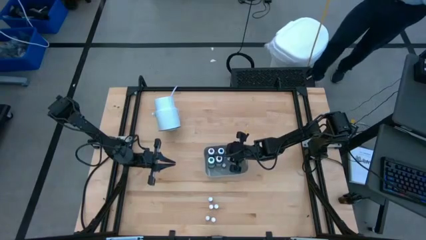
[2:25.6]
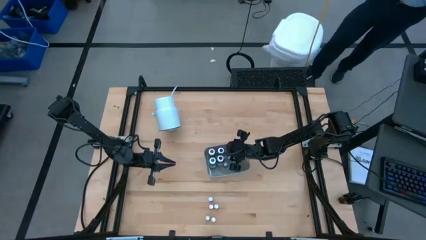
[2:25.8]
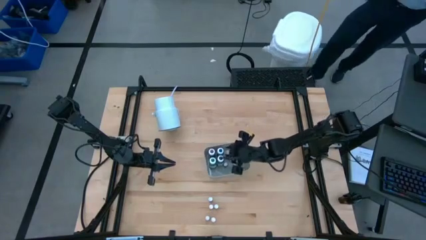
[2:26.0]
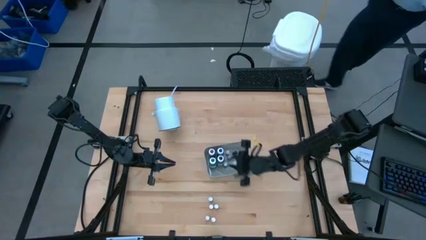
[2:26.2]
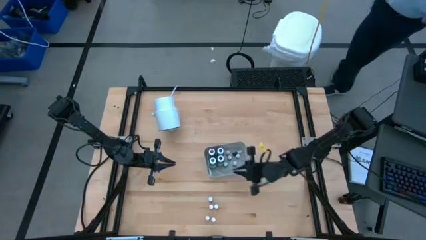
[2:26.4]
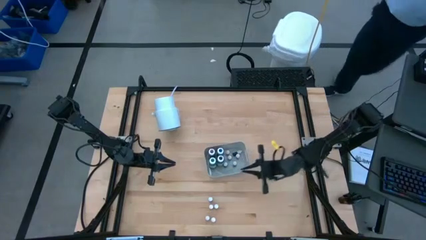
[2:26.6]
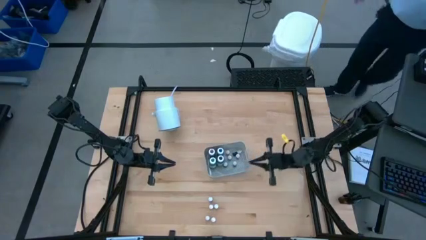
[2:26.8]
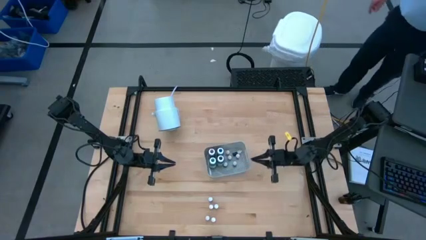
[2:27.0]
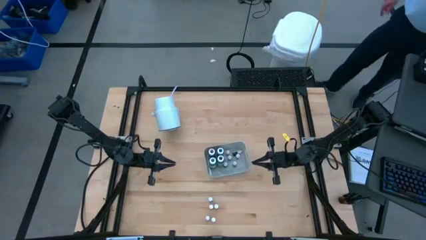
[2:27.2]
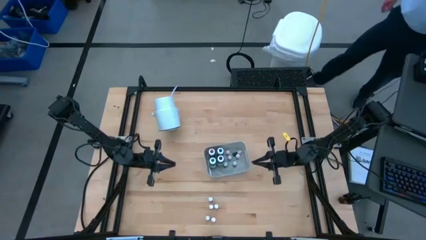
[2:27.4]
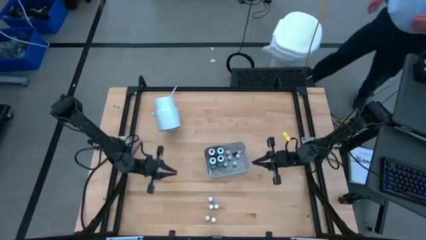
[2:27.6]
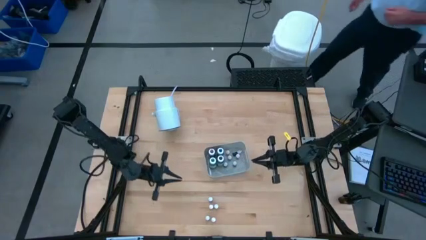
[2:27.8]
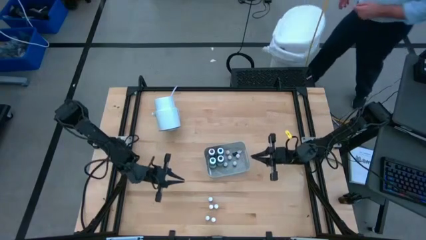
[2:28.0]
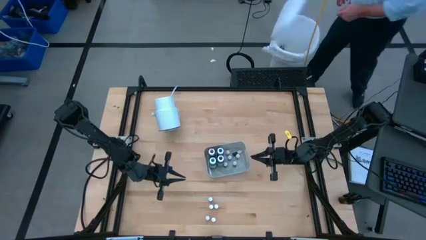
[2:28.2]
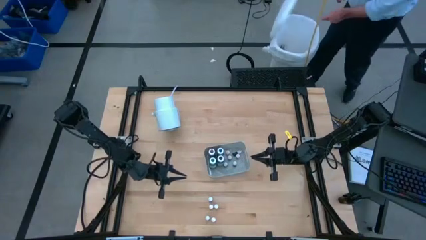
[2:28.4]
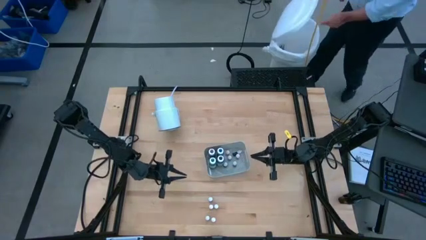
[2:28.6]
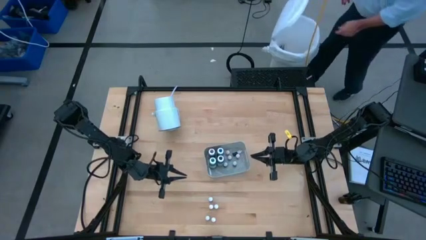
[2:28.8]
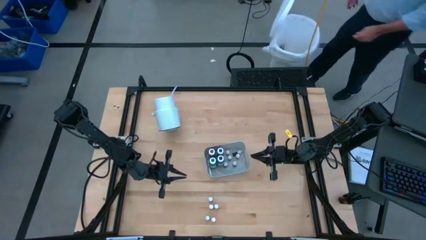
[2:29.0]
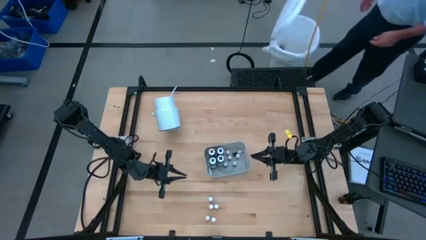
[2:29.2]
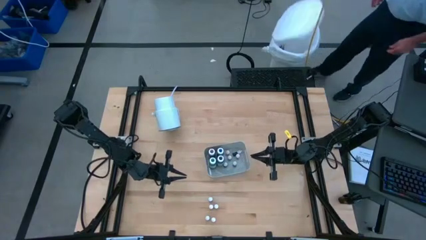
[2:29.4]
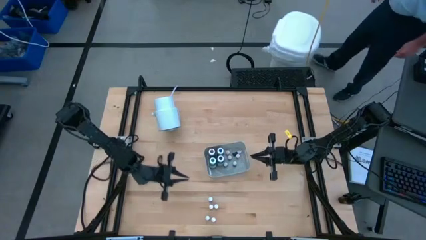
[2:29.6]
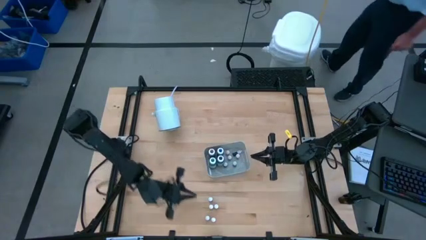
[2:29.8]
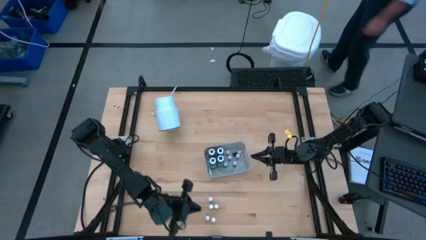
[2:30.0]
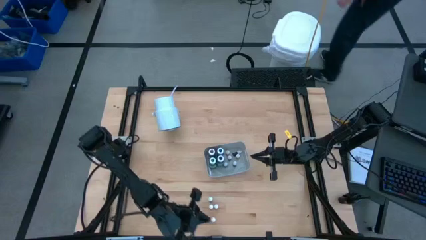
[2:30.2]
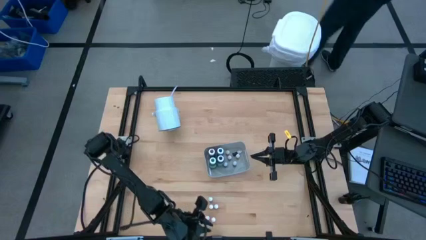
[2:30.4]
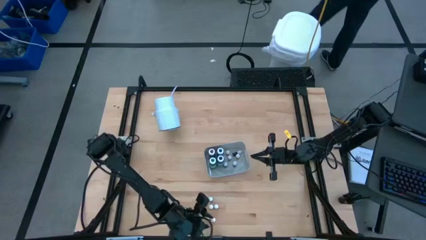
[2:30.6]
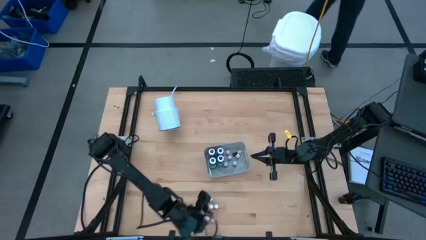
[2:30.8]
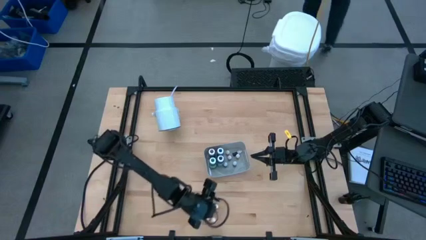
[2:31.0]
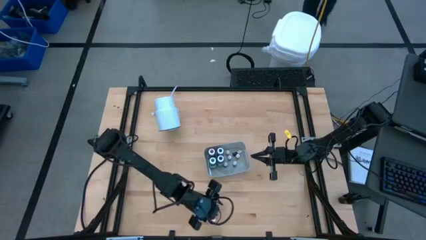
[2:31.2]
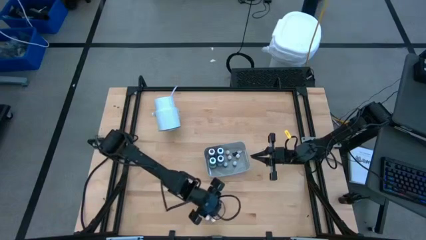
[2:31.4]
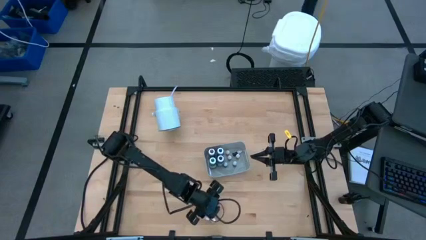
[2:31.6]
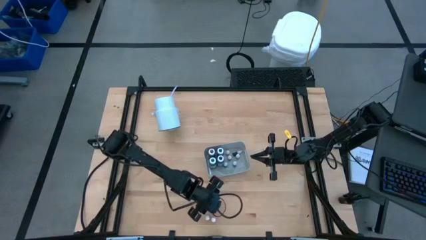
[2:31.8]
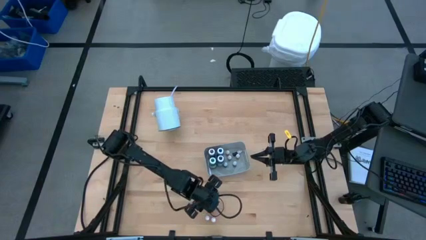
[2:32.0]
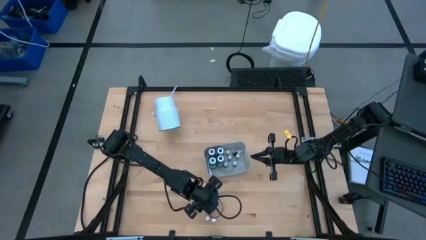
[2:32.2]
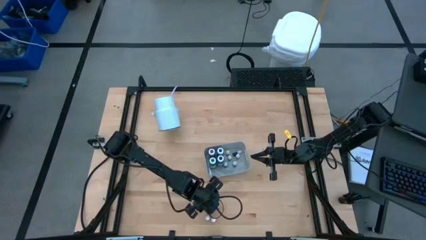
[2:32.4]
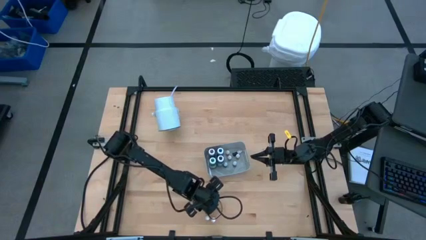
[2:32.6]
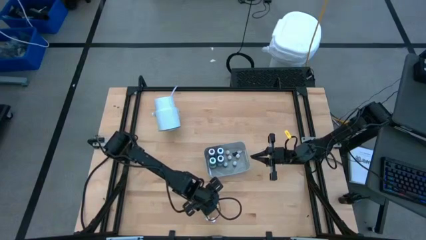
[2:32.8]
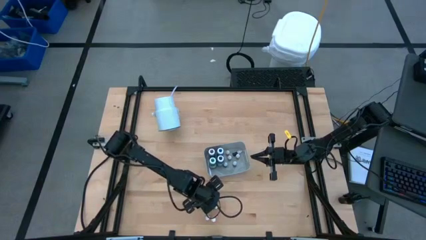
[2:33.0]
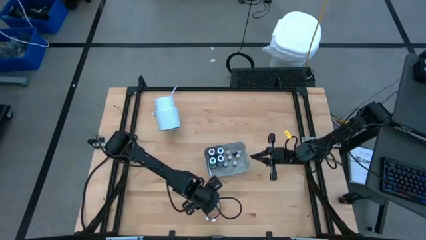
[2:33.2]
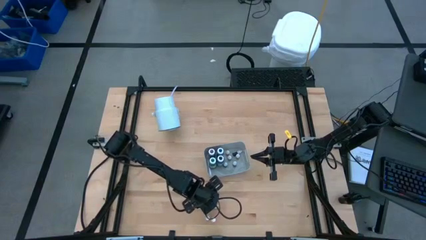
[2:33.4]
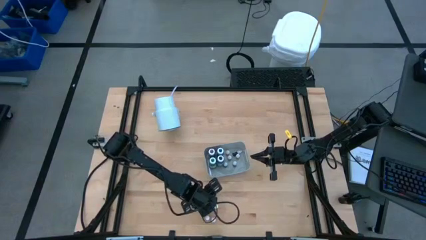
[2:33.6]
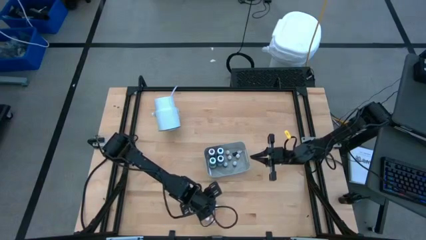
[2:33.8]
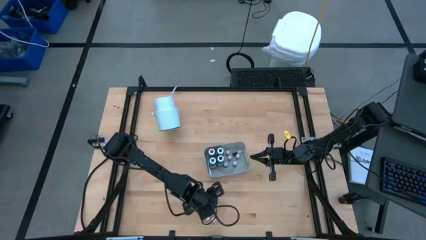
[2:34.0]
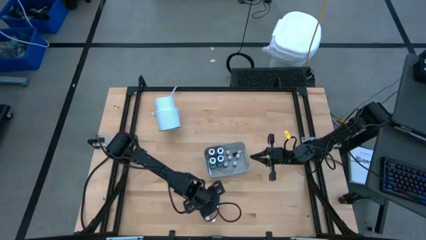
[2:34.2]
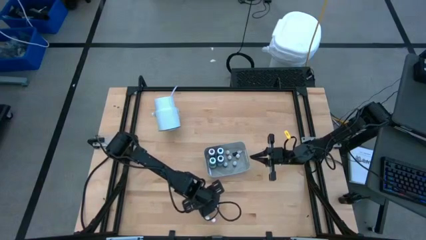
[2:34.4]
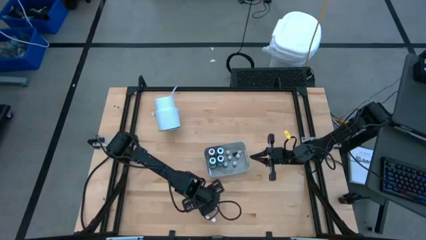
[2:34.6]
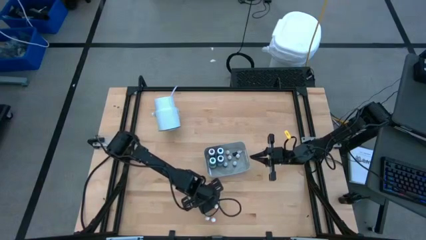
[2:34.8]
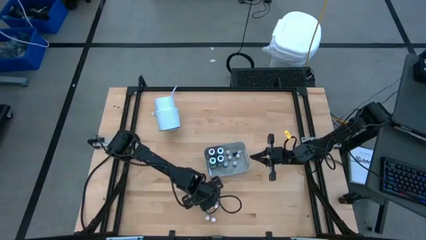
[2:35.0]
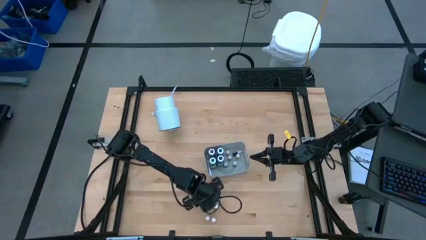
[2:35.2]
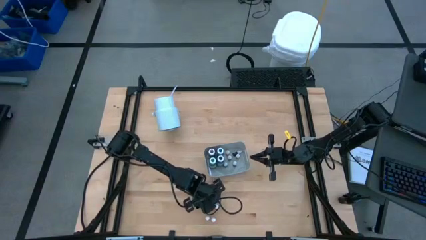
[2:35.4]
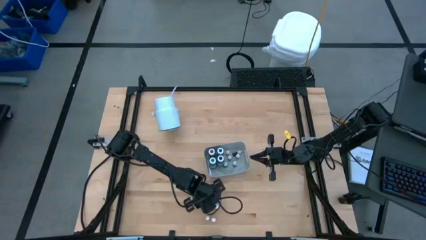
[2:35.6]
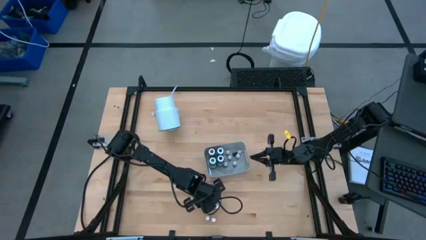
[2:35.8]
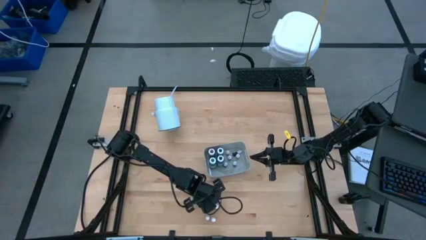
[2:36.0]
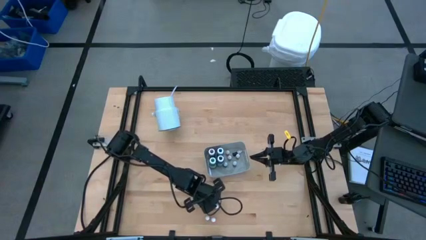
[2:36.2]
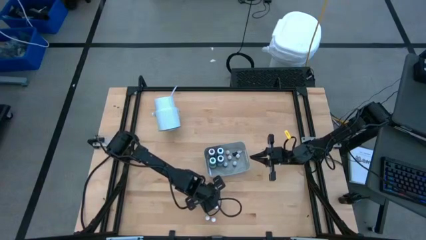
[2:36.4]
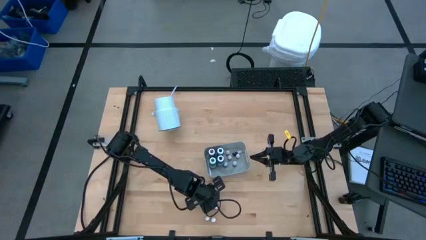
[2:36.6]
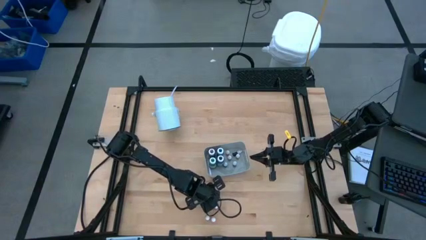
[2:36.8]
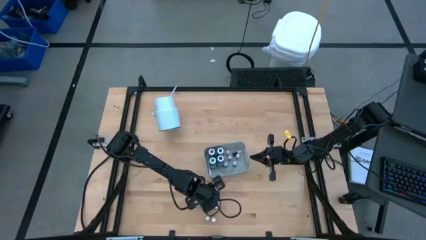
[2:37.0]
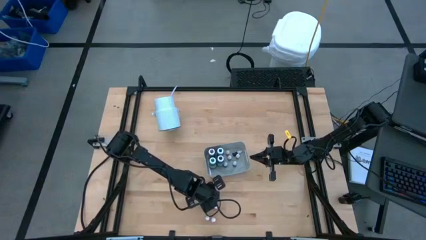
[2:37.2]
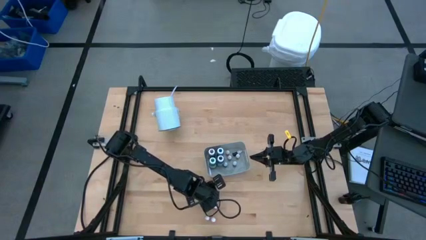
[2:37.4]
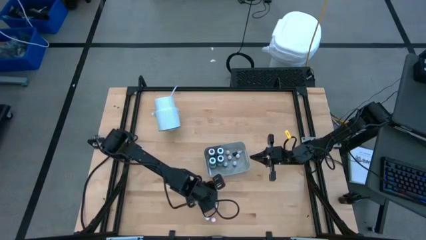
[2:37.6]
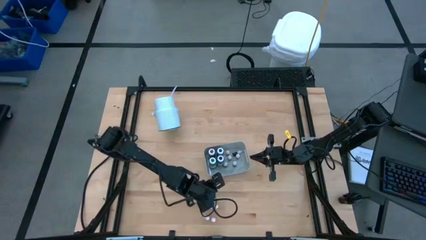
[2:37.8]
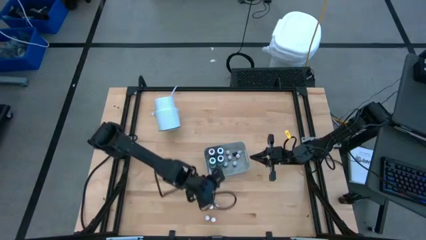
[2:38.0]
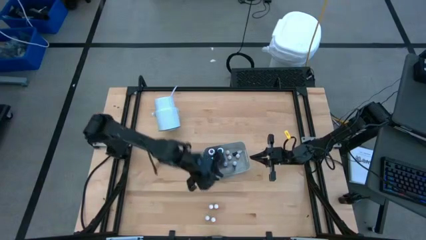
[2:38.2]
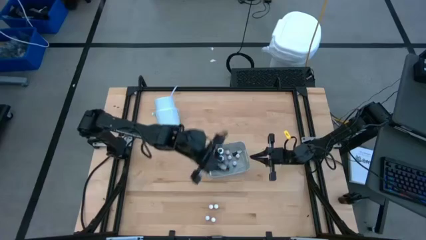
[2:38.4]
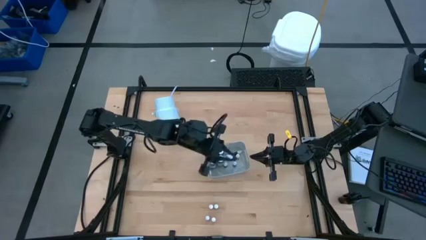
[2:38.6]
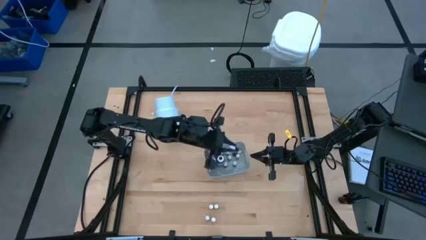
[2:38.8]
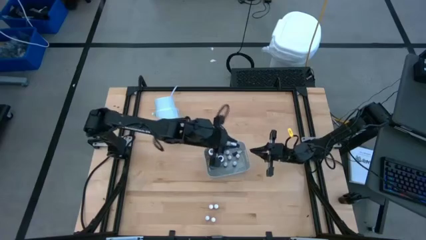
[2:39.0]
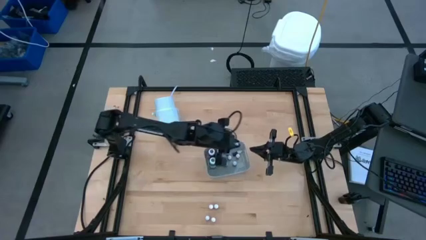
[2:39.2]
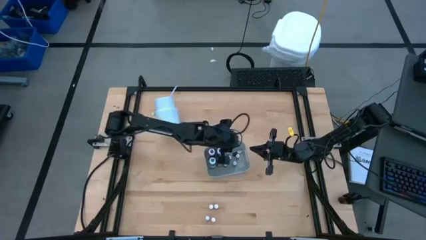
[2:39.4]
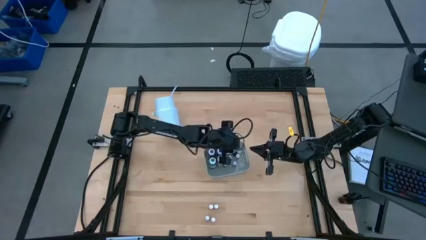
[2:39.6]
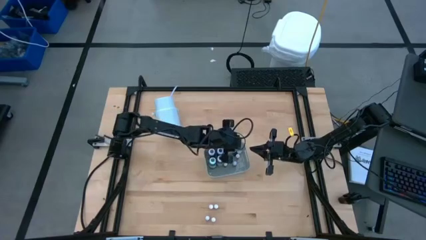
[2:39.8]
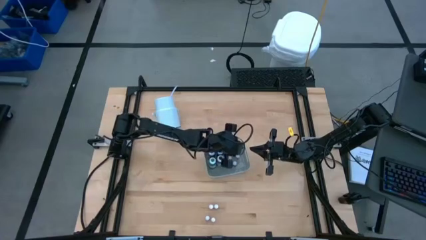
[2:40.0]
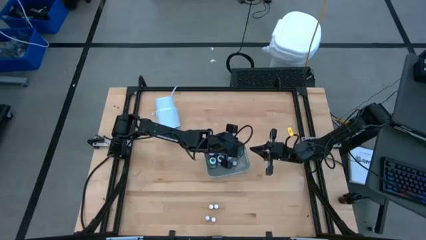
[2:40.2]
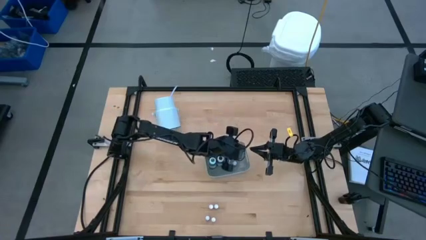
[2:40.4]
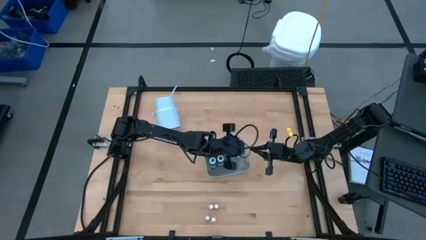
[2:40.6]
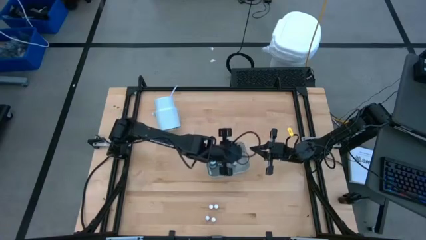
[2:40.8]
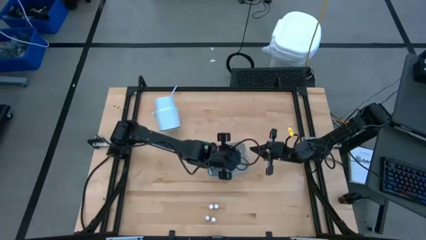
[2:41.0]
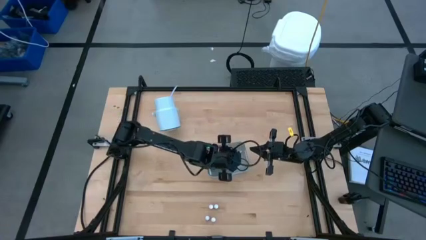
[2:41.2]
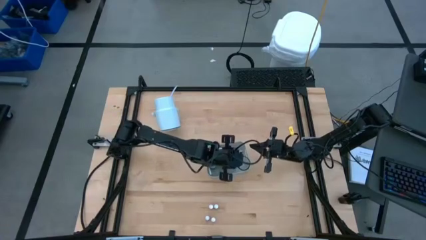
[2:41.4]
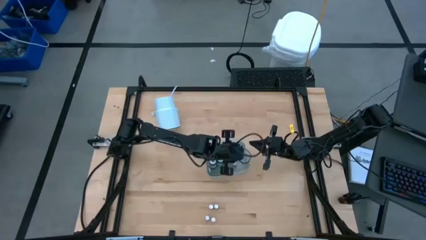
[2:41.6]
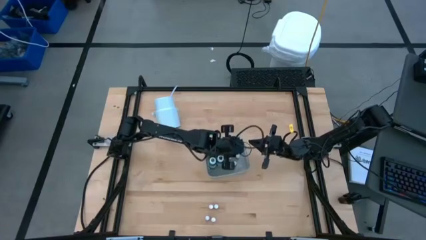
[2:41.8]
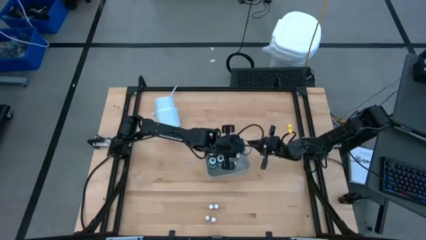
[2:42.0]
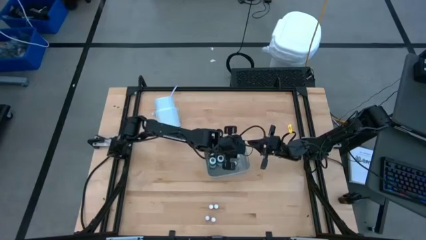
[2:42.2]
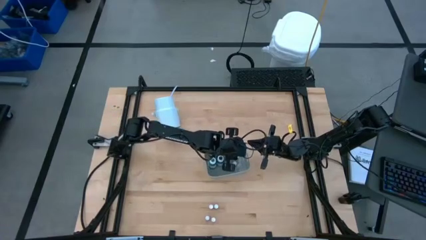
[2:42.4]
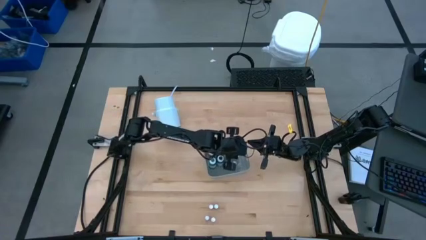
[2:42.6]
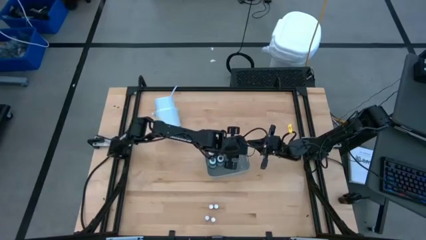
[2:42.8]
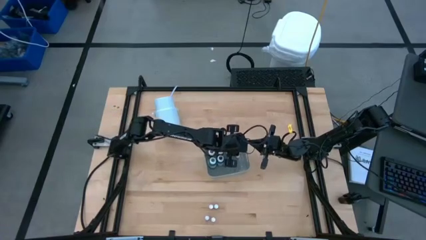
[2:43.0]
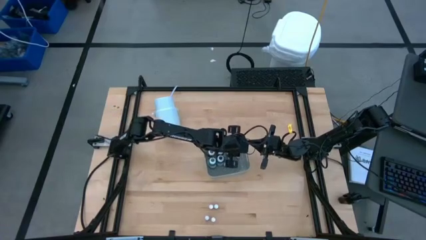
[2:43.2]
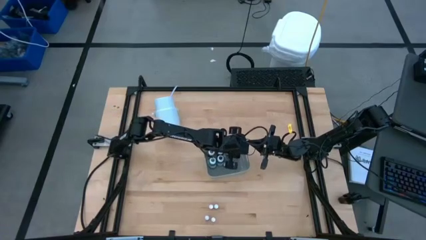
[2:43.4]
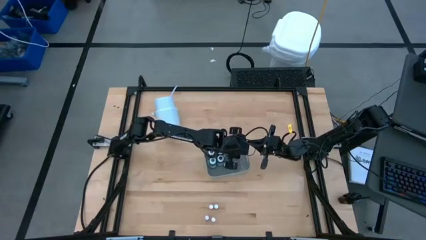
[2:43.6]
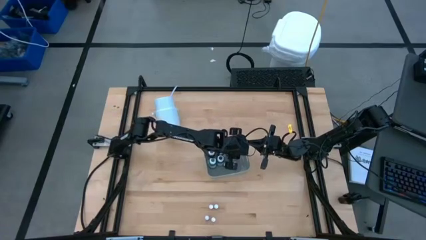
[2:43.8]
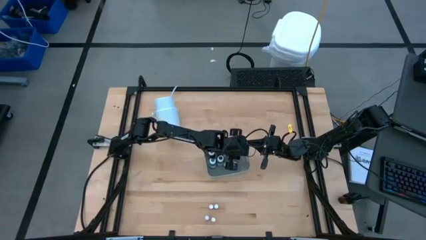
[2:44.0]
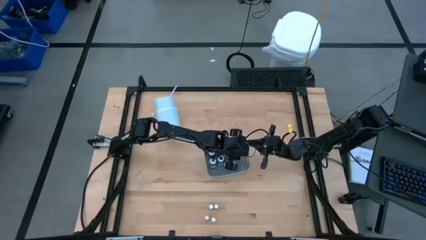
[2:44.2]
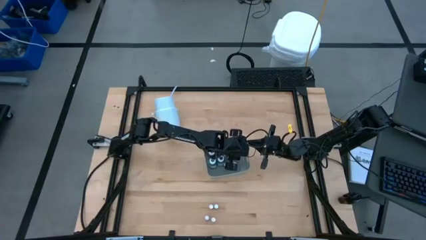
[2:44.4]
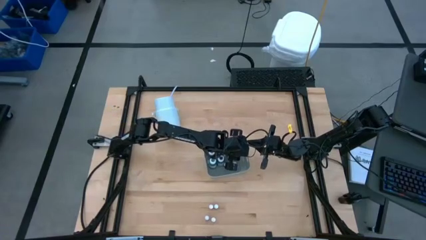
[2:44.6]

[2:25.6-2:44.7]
Task: Pick & Place food coloring
Put the small purple food coloring bottle into the bin
